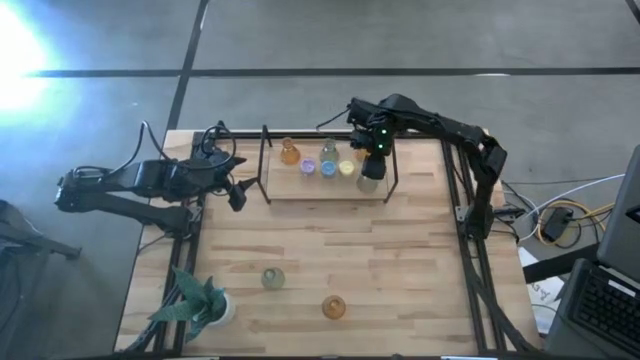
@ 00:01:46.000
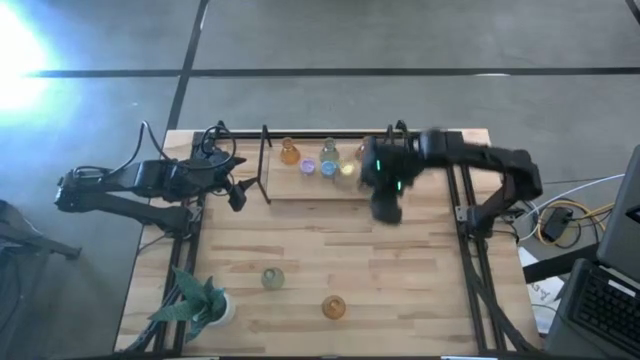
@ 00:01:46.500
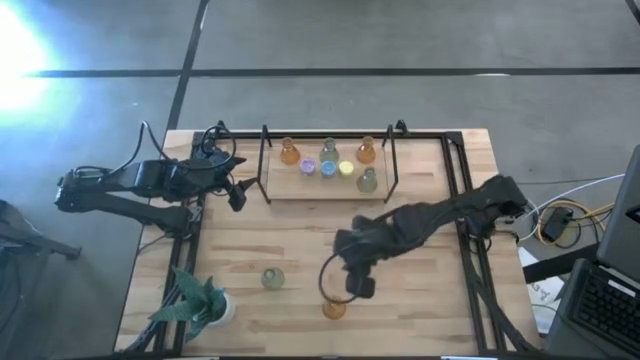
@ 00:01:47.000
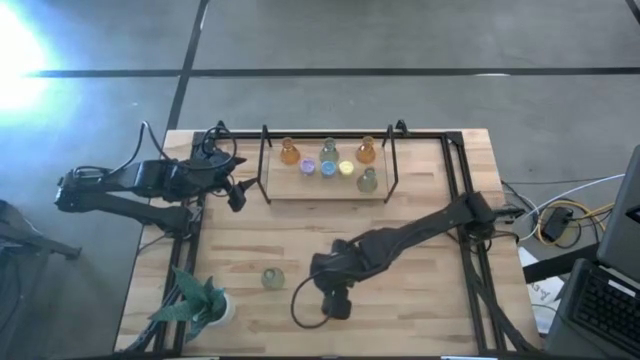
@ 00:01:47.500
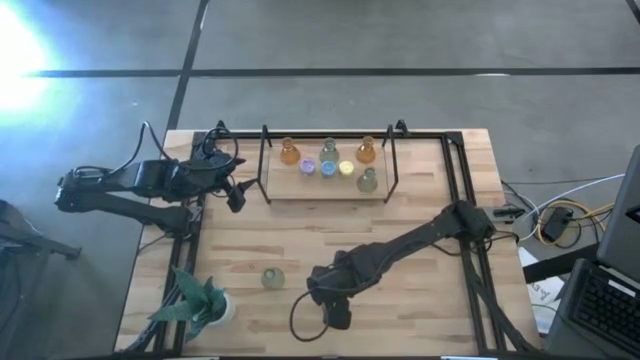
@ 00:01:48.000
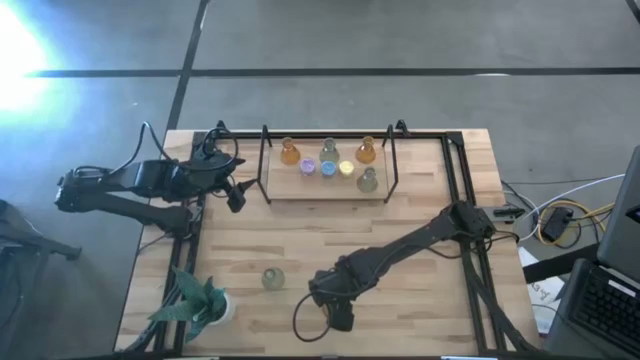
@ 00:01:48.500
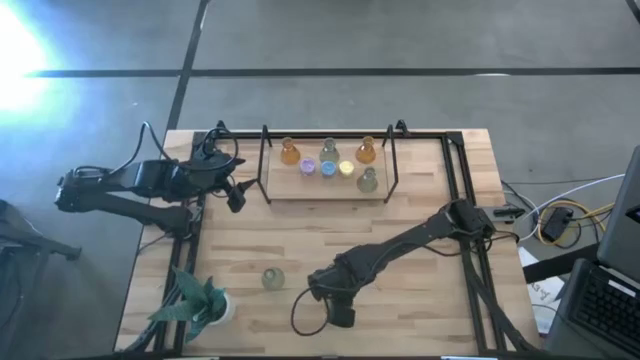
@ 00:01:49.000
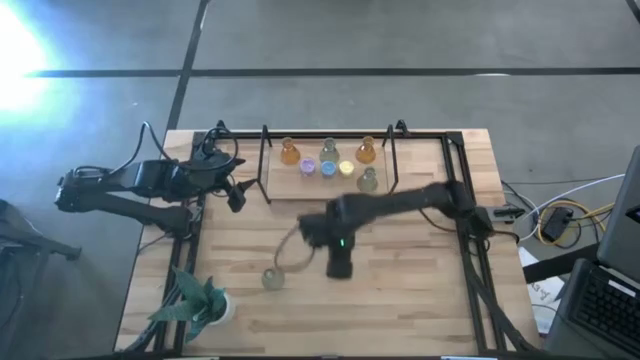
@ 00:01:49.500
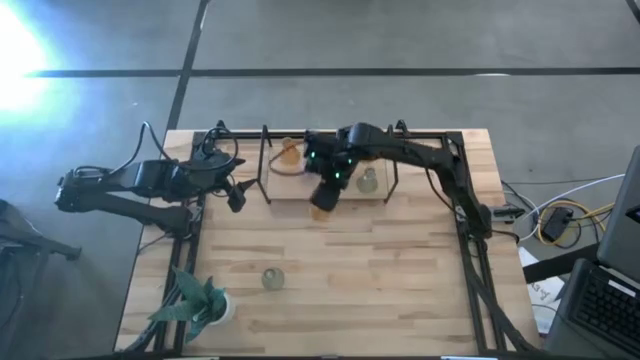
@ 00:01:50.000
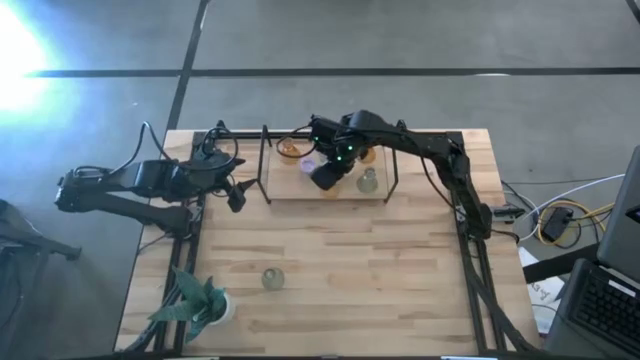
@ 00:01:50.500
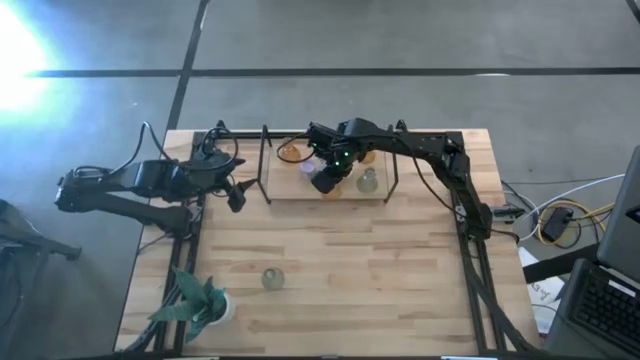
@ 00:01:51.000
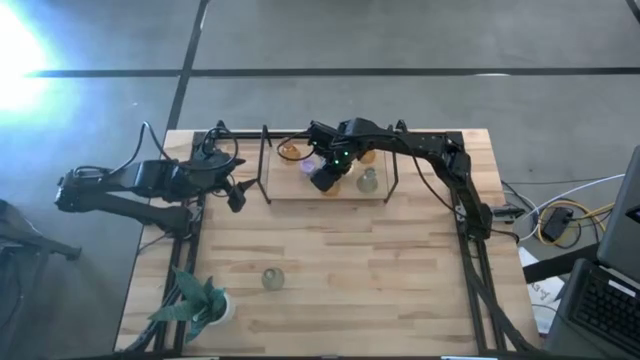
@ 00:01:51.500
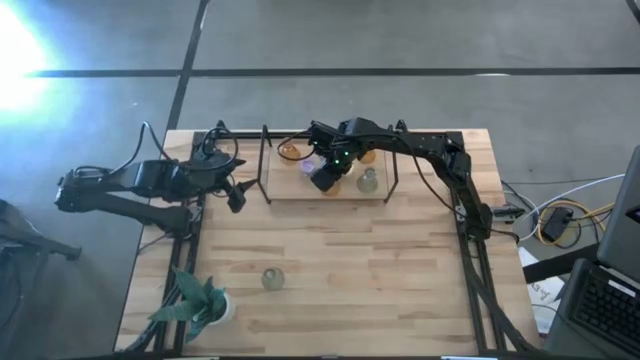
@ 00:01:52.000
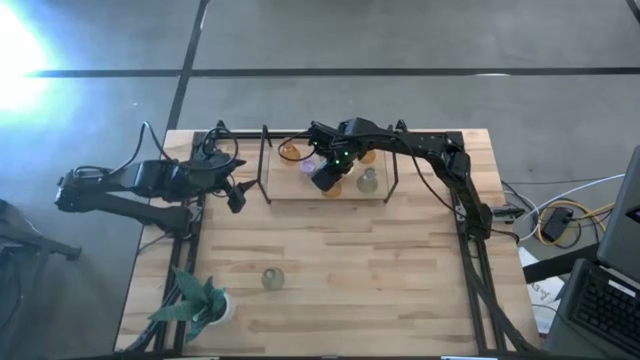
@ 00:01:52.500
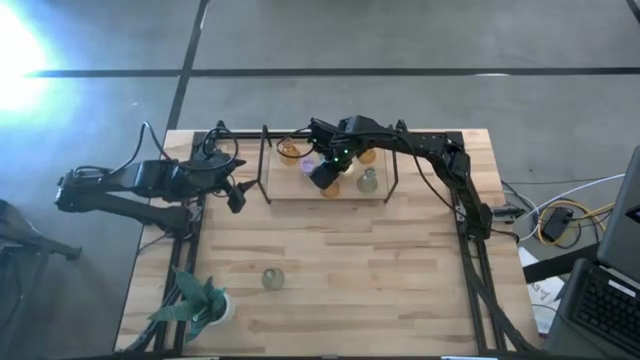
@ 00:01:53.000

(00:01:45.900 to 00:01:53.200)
Task: Pick & Place candle stick holders
Put the yellow glass candle holder on the shelf

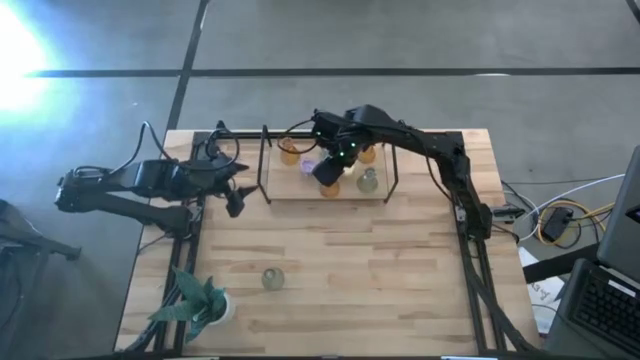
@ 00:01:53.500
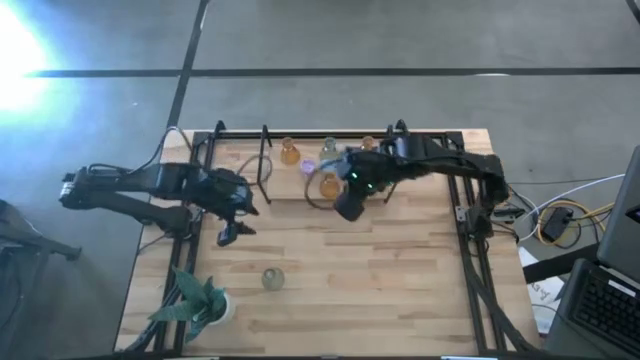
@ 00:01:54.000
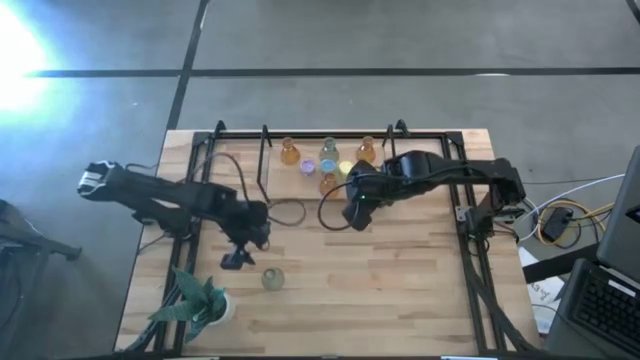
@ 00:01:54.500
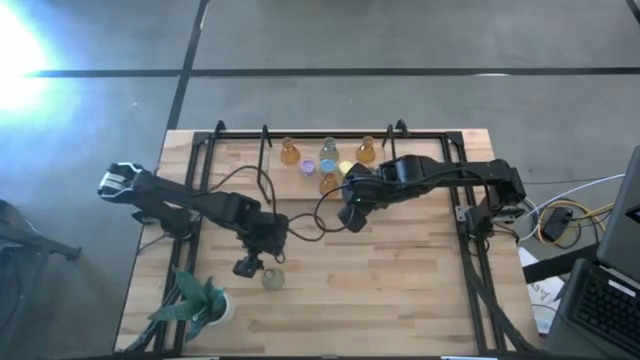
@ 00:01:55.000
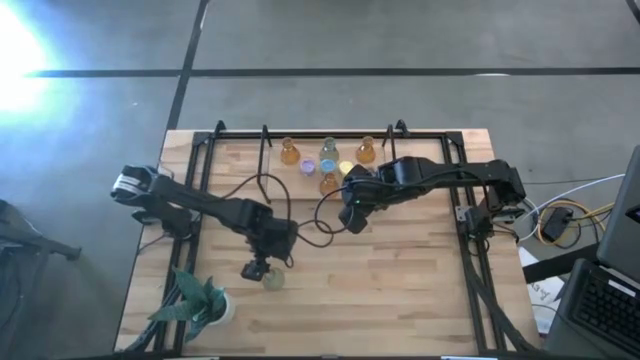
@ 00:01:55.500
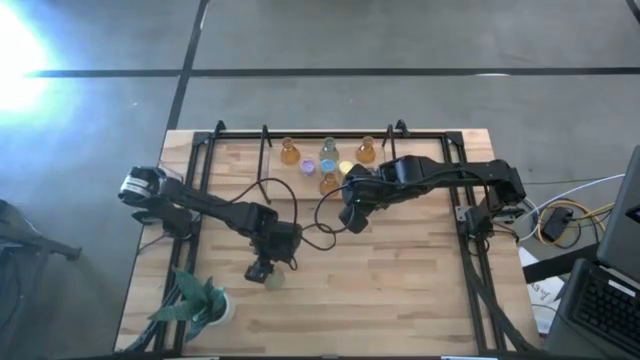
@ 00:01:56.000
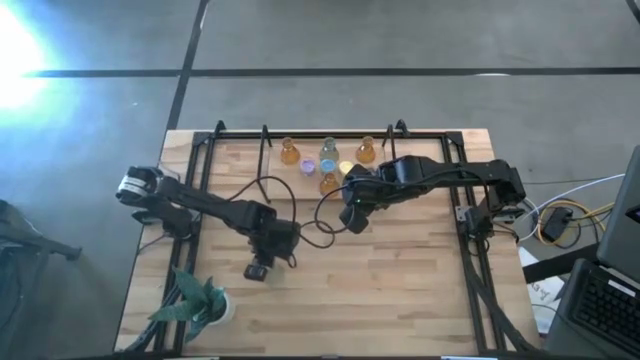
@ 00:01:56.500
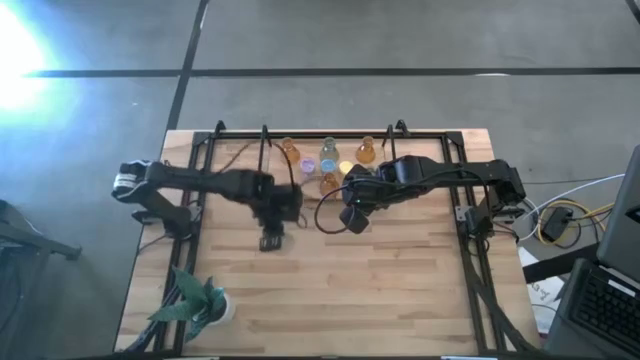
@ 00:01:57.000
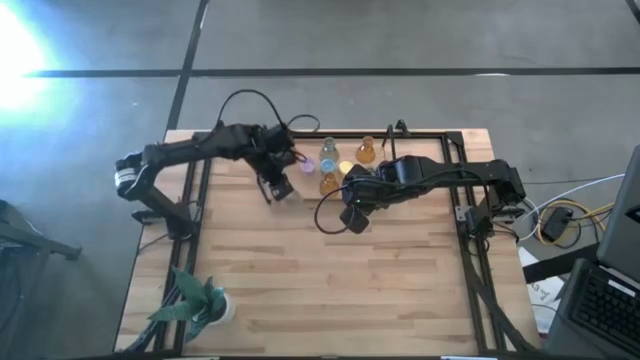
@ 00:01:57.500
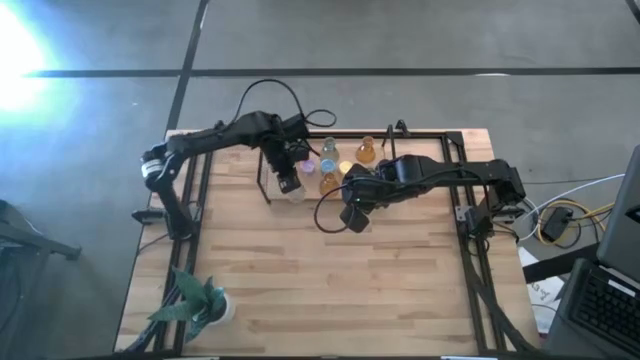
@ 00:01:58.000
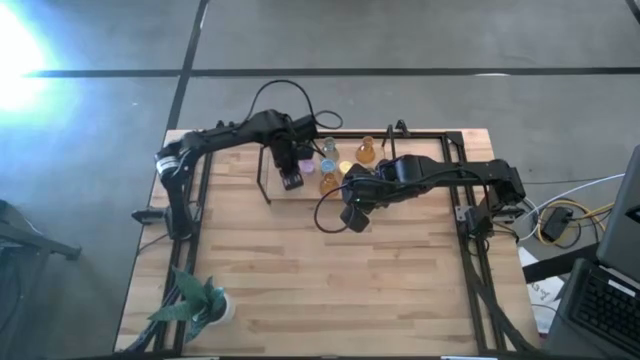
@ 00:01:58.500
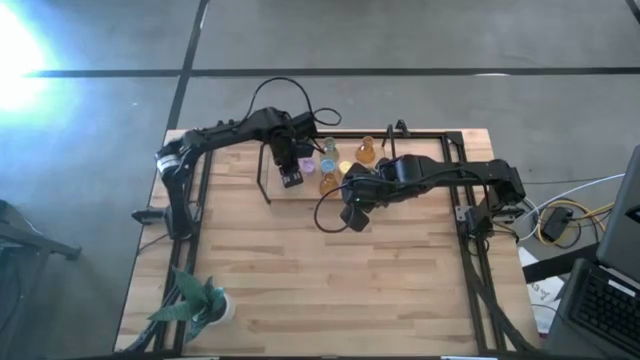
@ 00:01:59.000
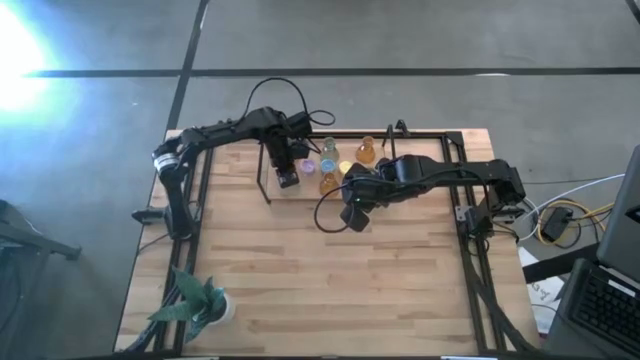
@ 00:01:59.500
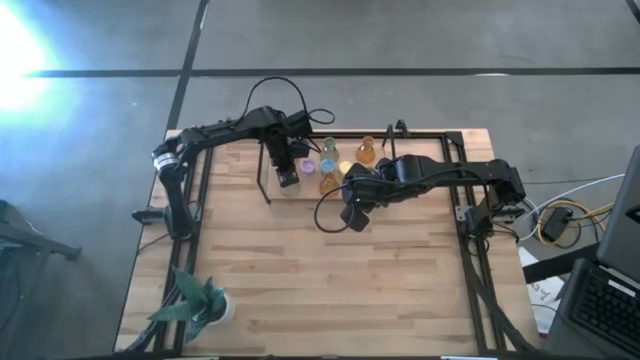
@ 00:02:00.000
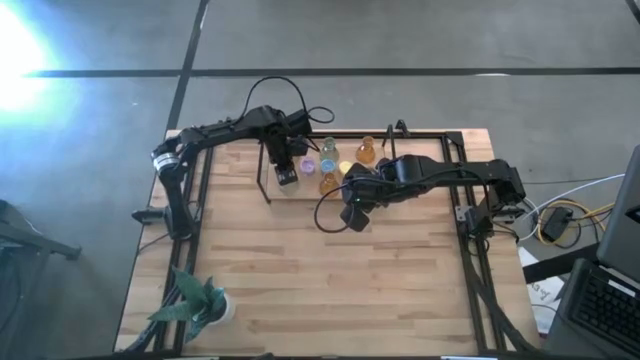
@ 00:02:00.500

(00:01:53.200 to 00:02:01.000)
Put the green glass candle holder on the shelf

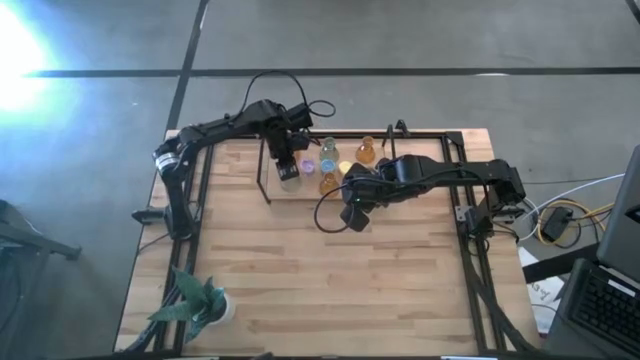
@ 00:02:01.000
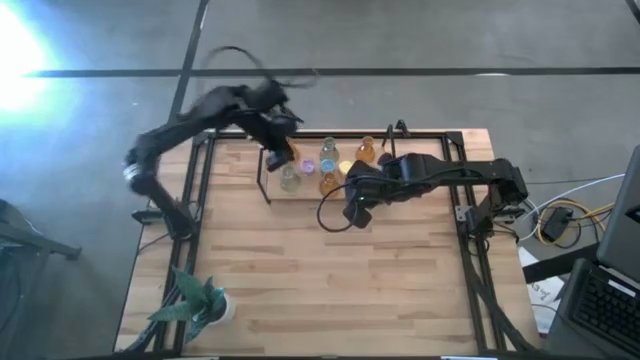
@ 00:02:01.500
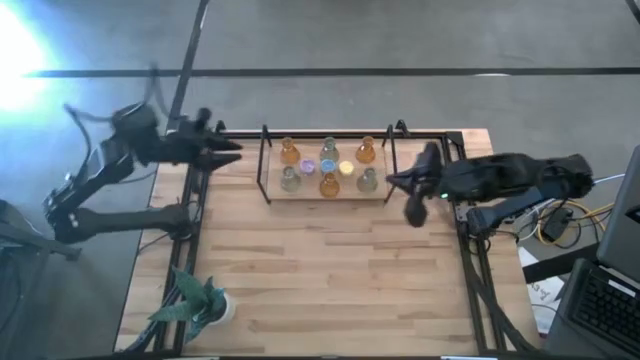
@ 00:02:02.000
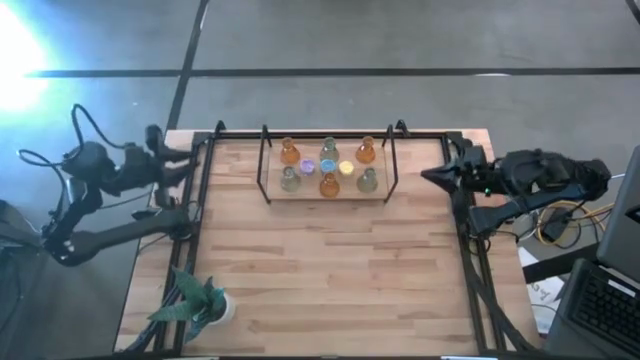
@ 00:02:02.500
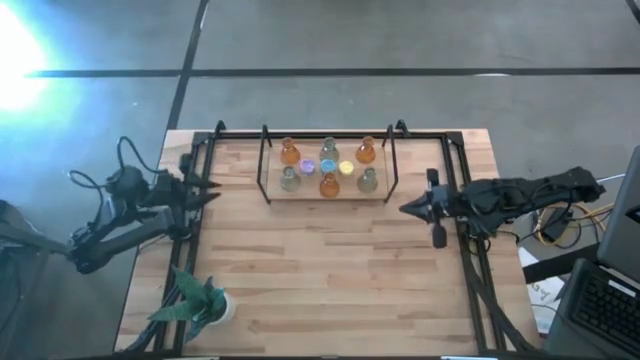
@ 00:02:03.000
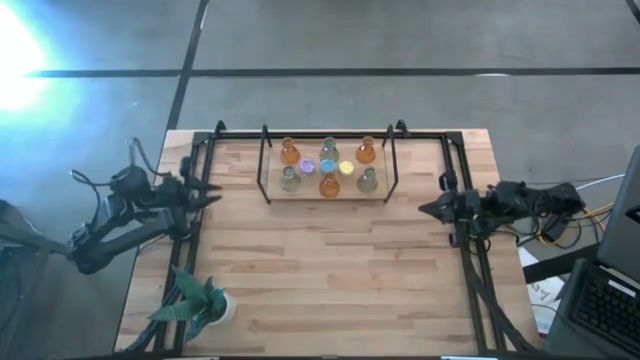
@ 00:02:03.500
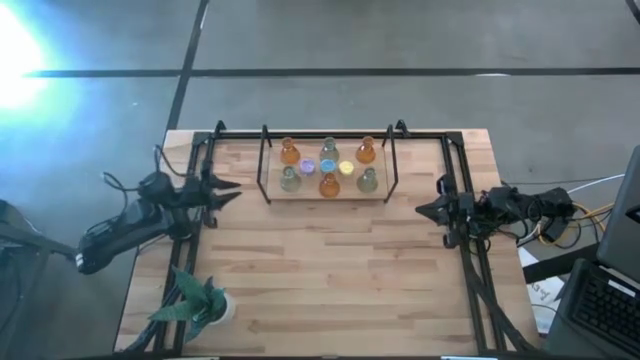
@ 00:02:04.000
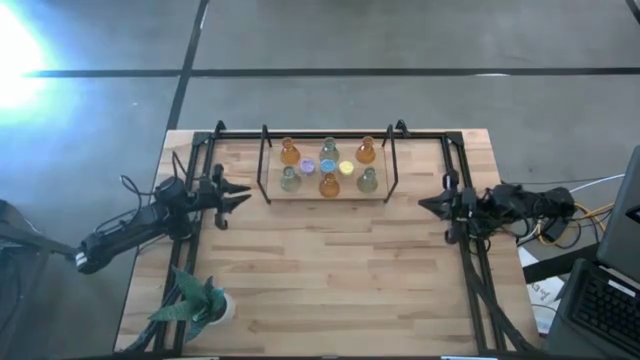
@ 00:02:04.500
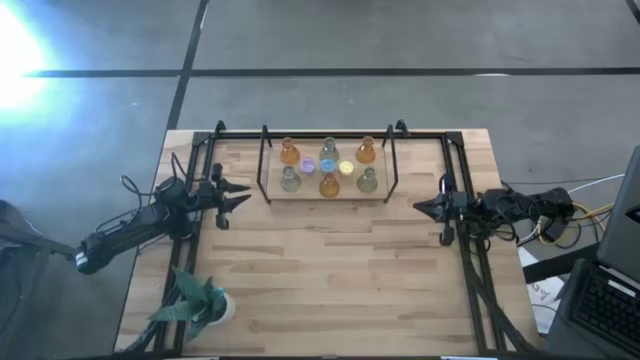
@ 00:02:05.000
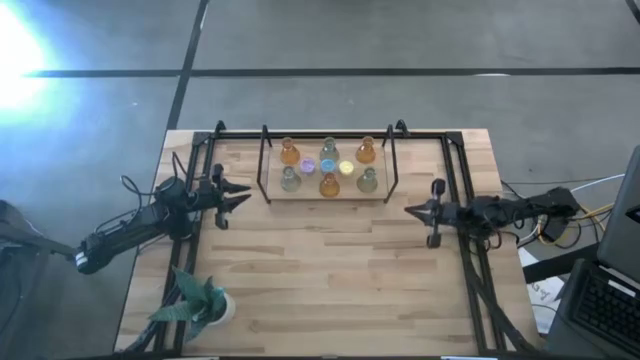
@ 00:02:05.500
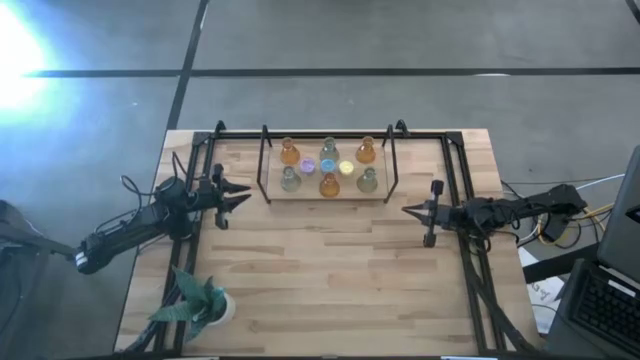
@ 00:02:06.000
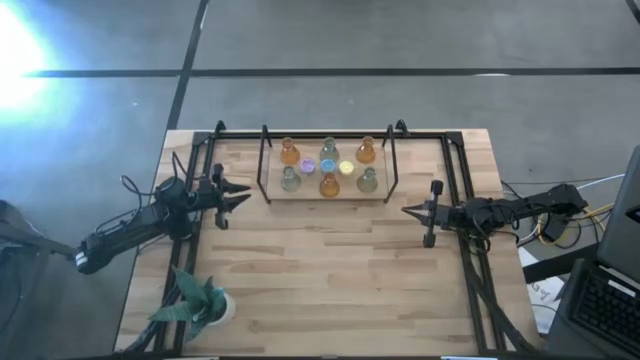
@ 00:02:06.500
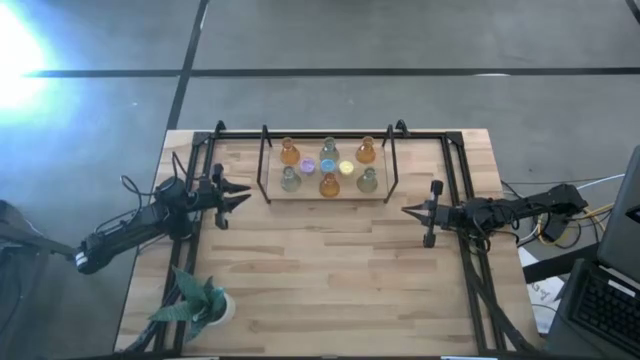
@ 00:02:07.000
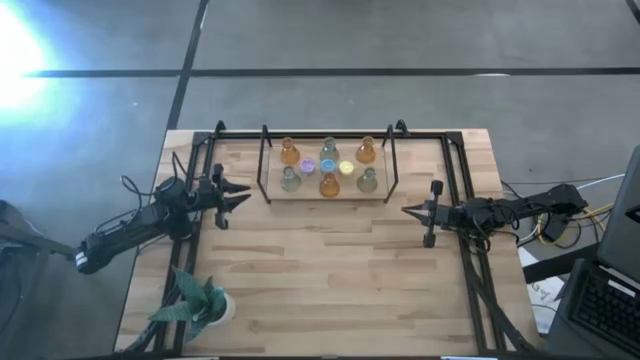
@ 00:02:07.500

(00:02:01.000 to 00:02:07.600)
Return to Home Position
